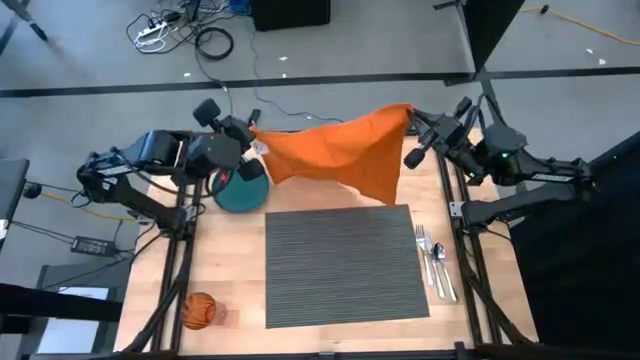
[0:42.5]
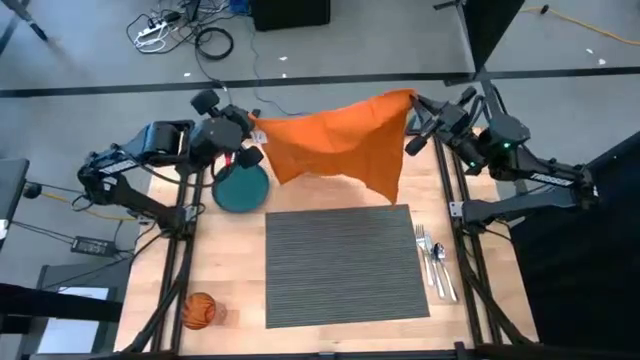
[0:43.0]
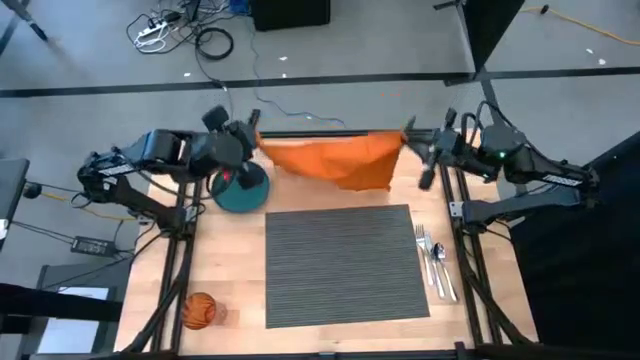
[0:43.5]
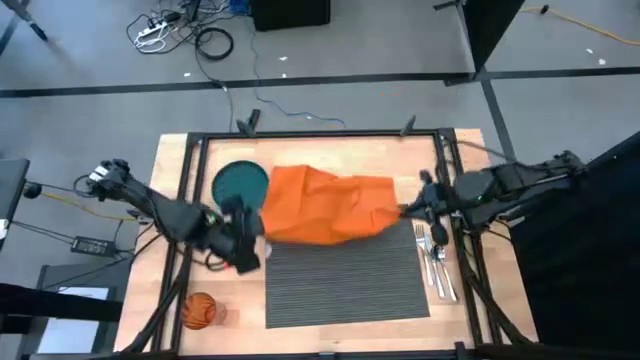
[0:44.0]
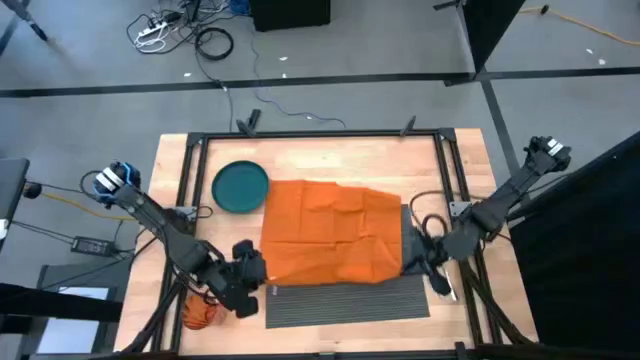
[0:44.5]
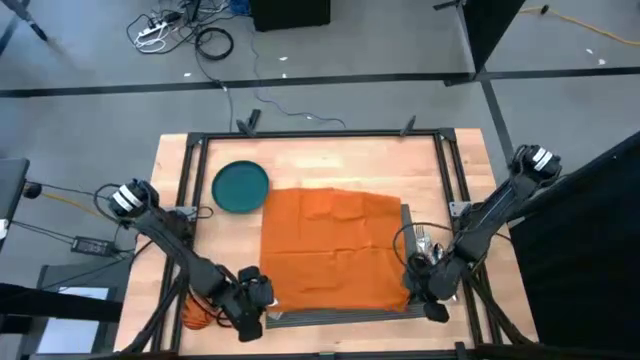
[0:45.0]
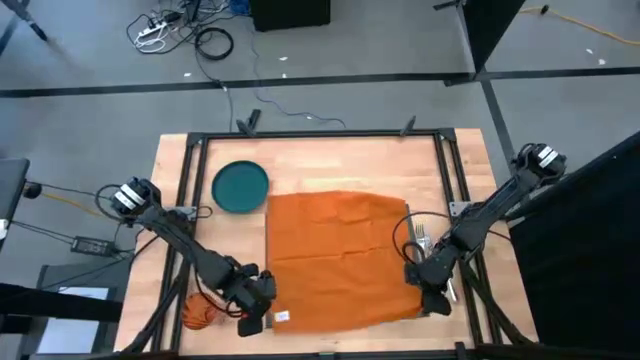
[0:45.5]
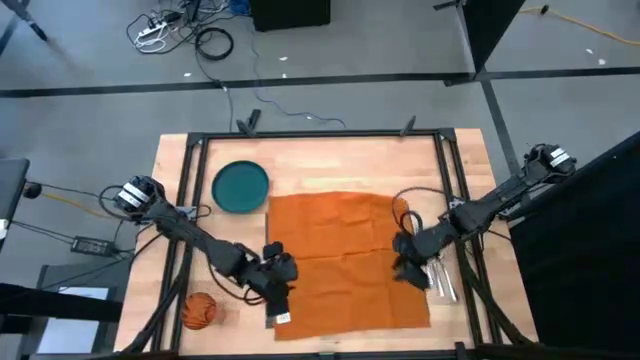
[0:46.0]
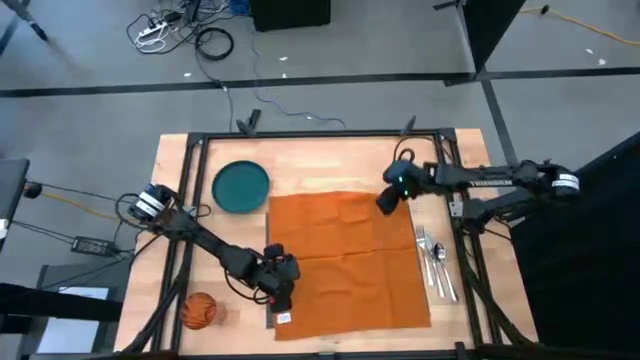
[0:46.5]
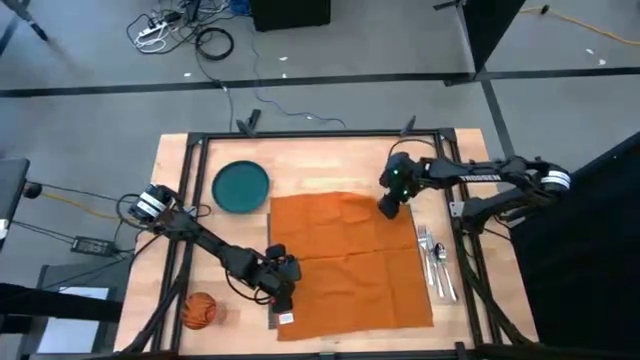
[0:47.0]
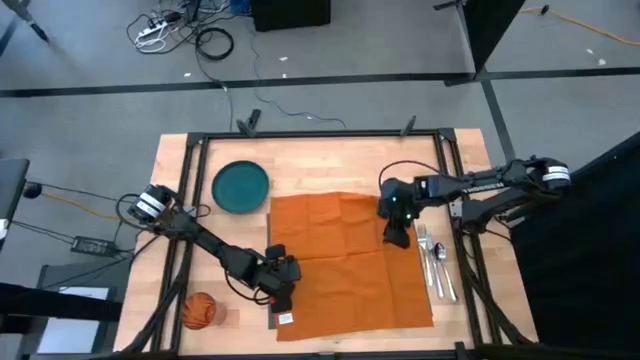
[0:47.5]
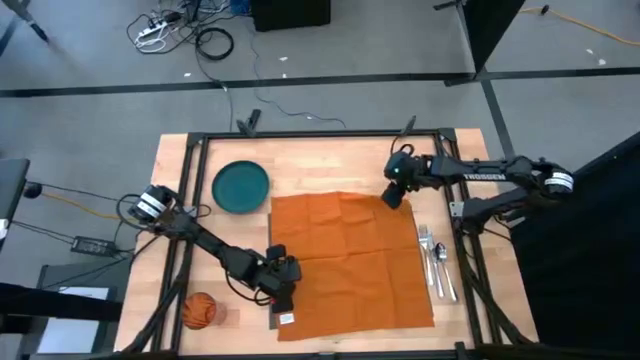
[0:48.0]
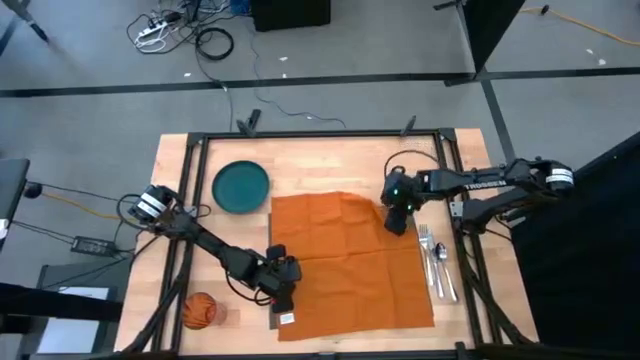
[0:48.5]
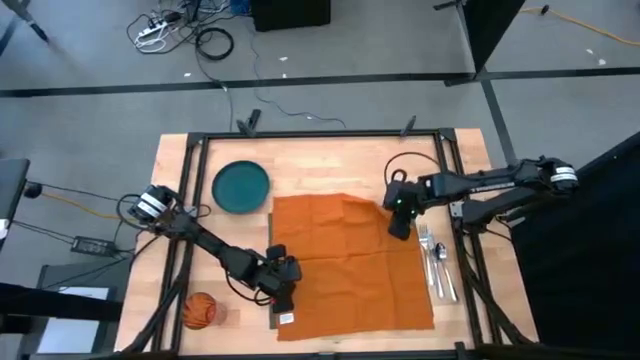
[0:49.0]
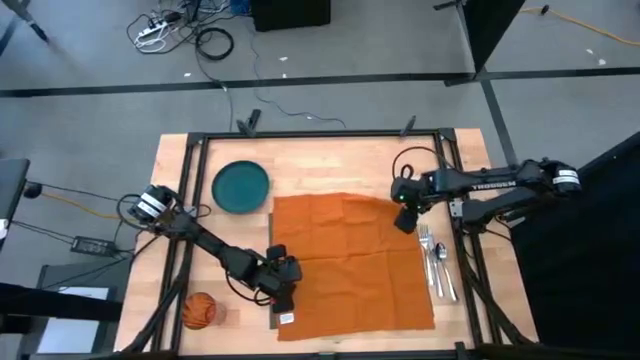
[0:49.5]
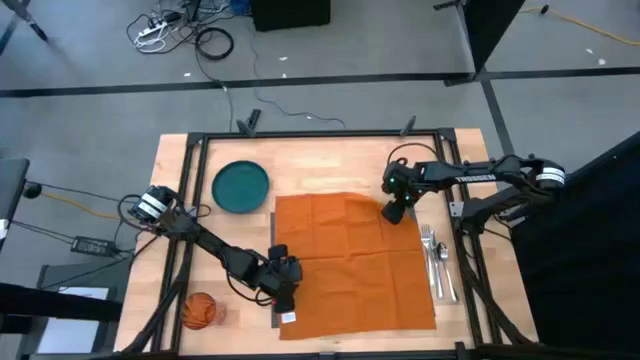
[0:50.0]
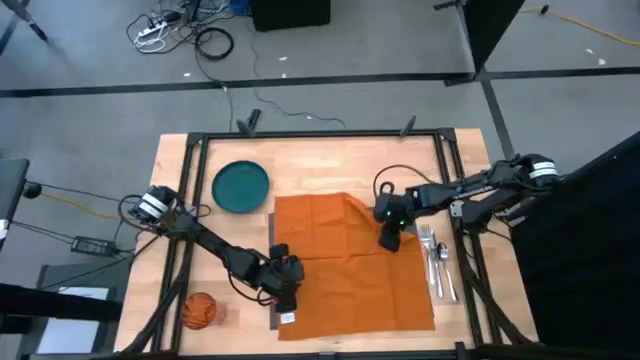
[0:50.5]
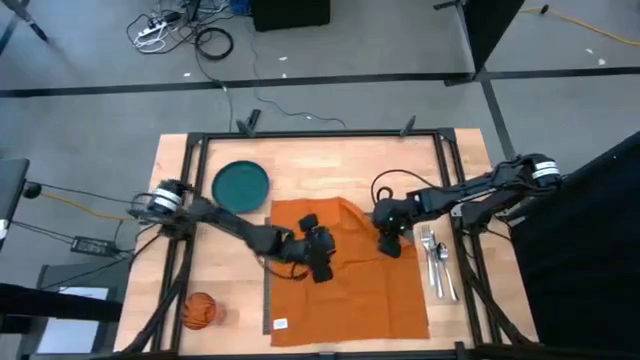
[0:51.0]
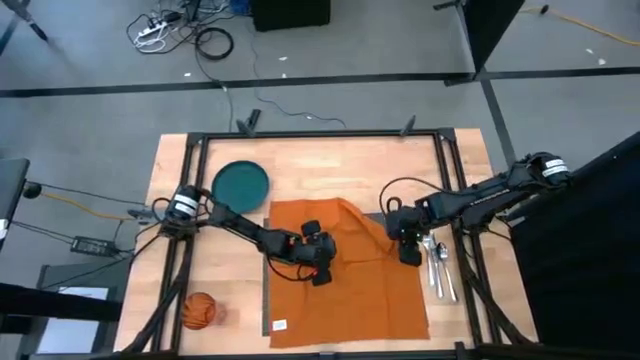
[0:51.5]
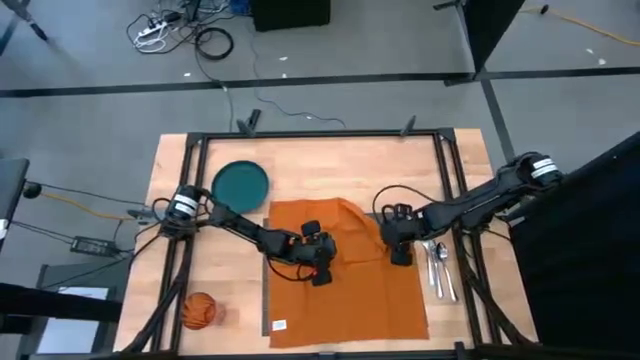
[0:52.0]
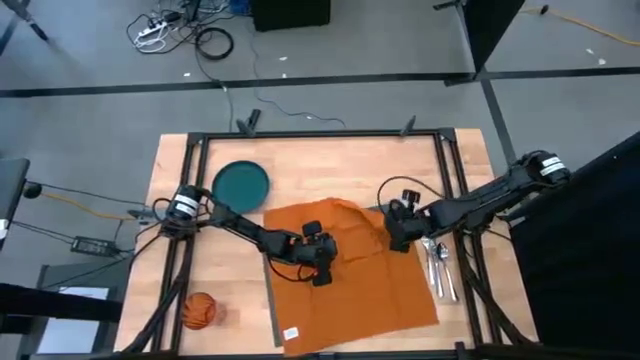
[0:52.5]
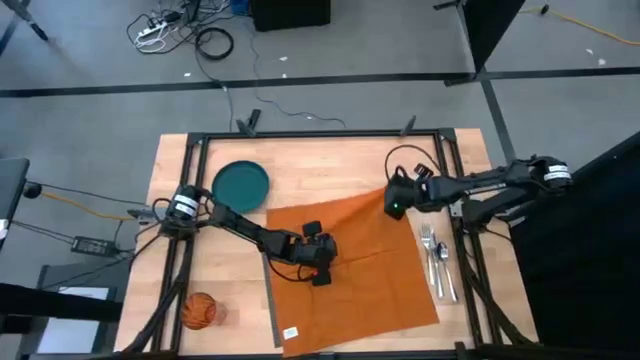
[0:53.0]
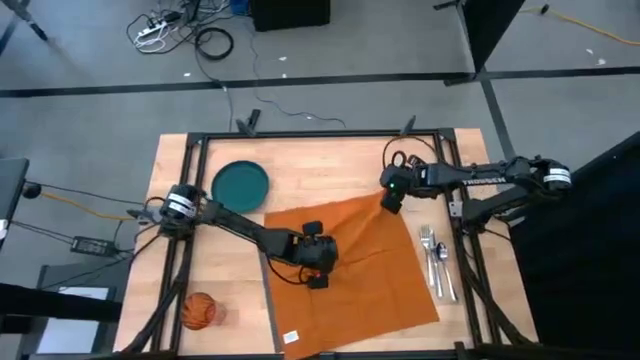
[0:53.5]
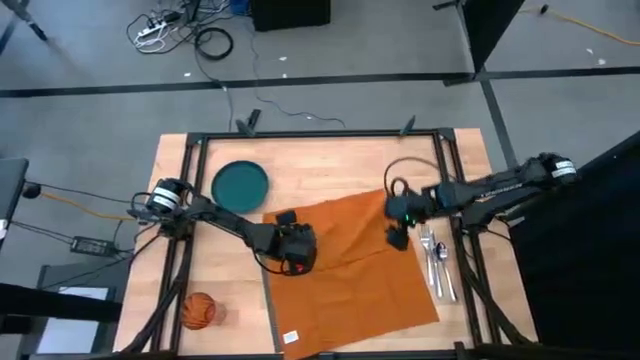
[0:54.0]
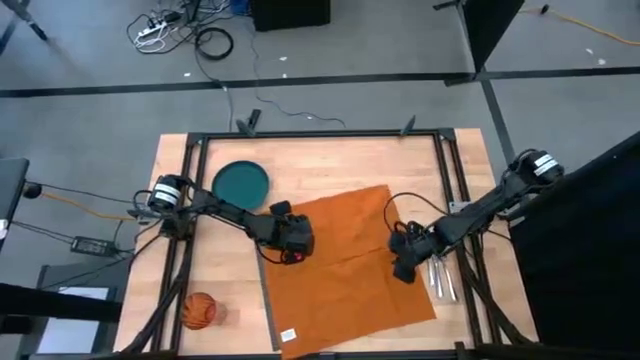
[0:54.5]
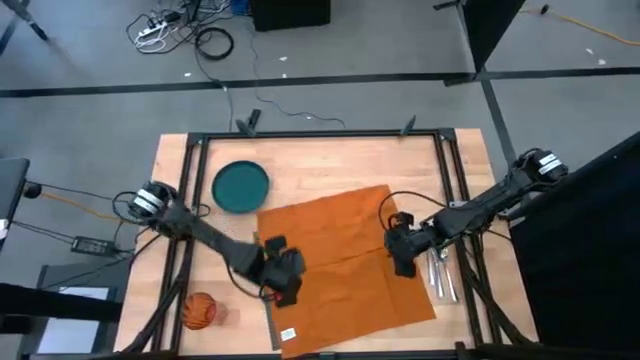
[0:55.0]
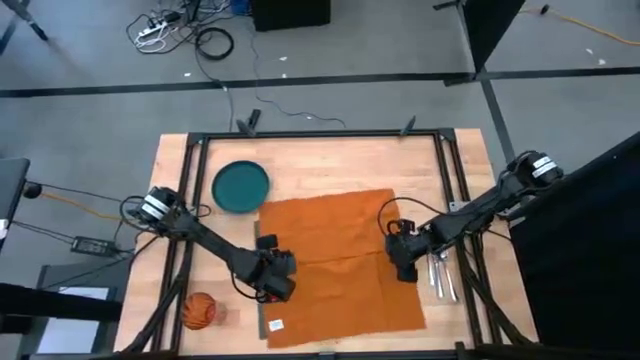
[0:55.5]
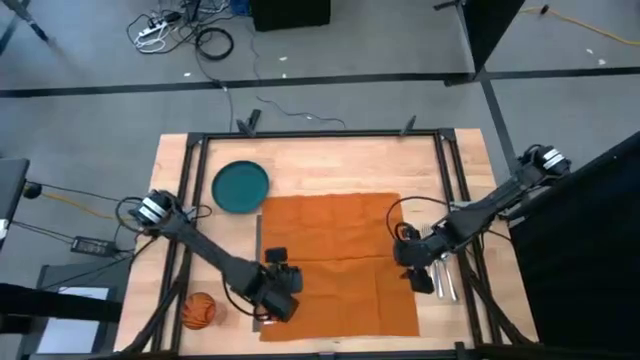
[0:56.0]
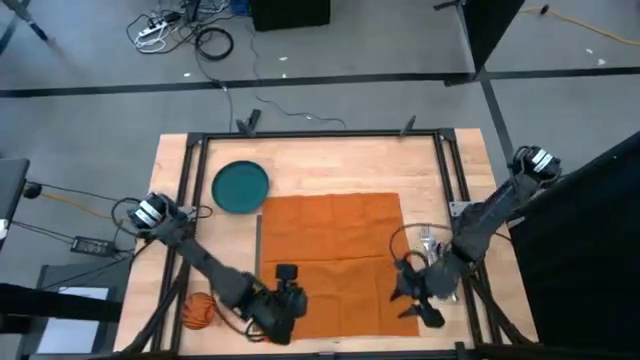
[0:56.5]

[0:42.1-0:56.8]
Task: Set table place
Fold the orange table napkin

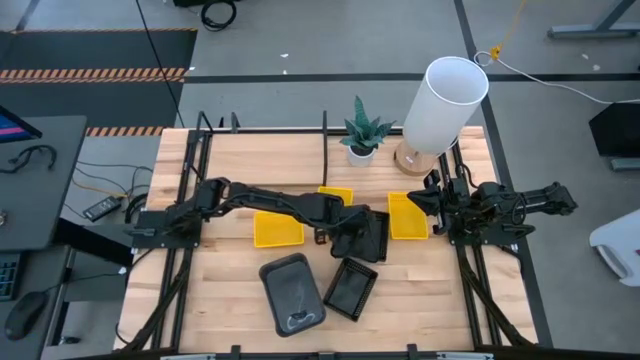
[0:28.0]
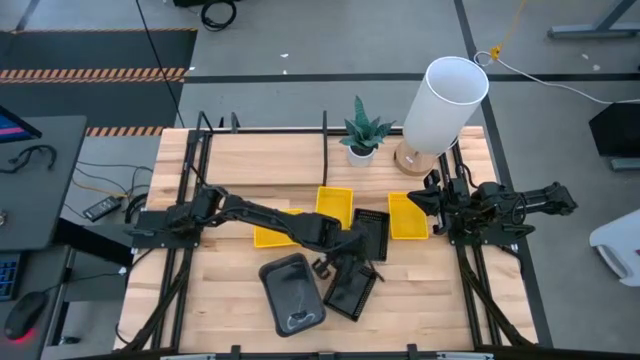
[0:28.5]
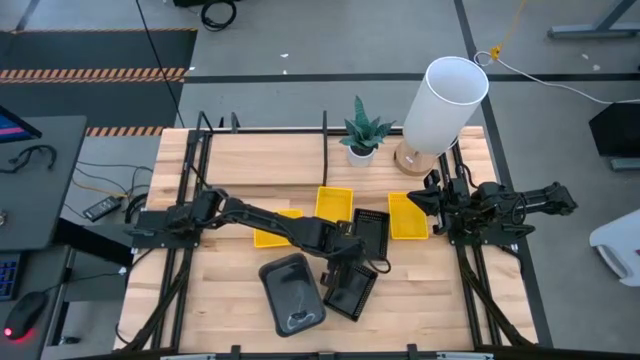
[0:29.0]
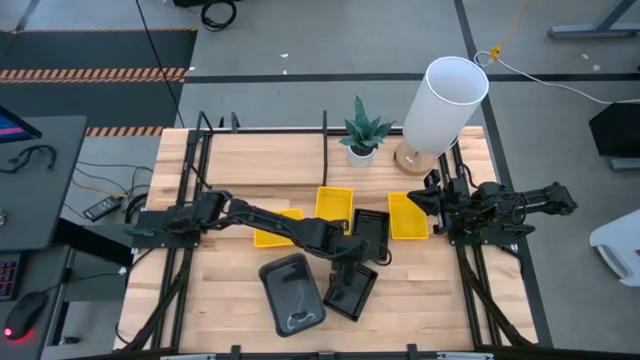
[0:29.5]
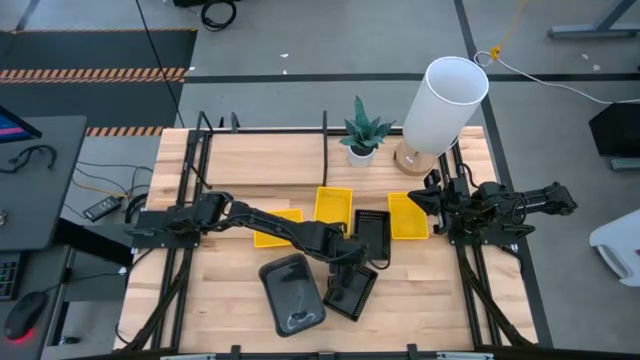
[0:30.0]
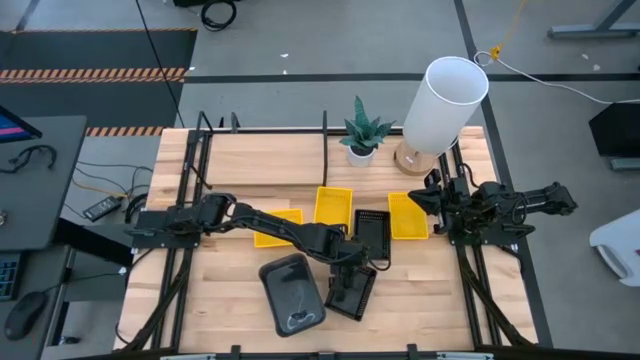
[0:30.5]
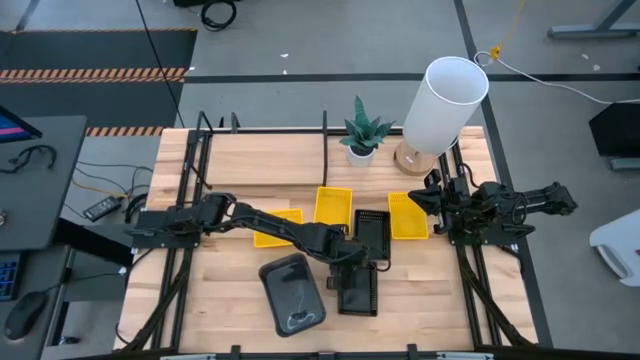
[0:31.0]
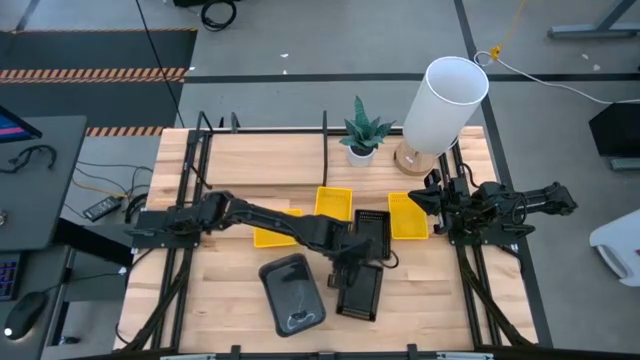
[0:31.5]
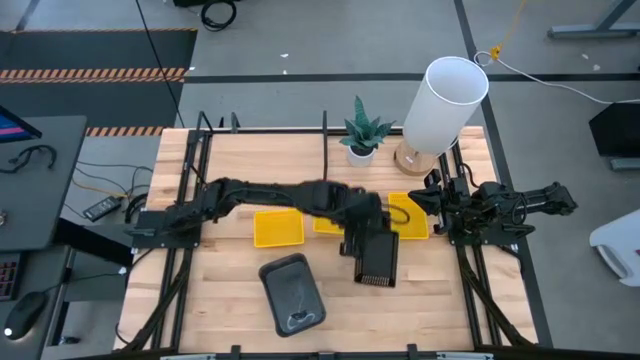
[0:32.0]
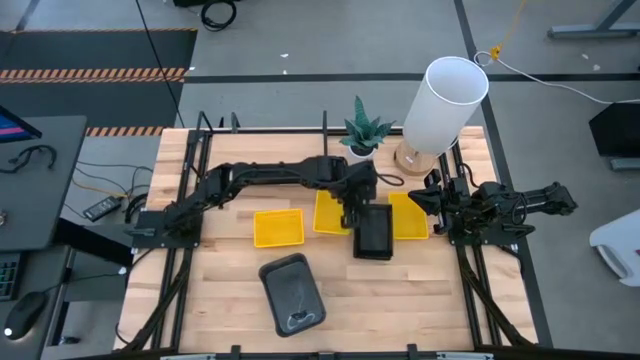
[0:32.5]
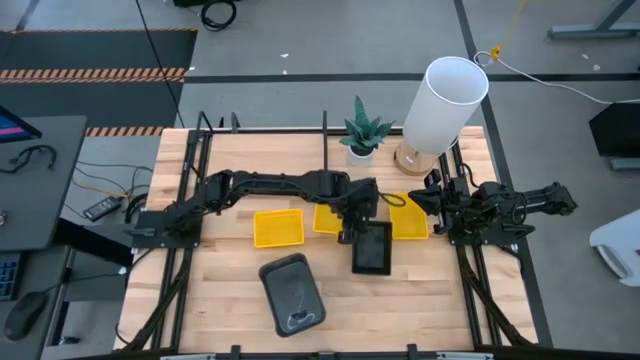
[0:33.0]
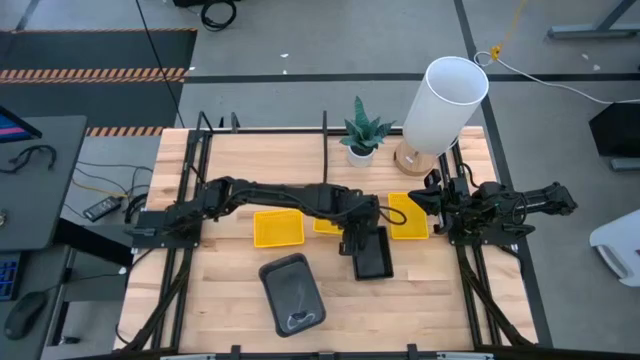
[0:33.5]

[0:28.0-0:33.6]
Task: Stack baskets on shelf by color
Stack the black bin on the stacked black bins
